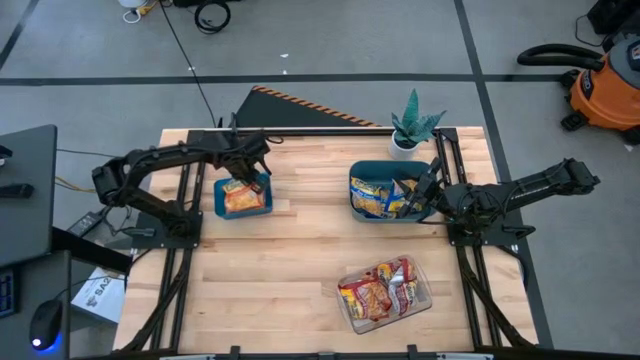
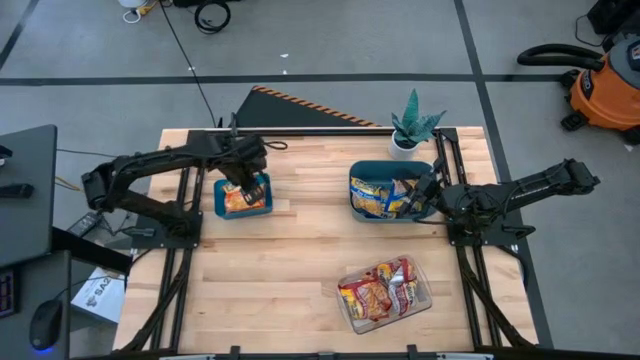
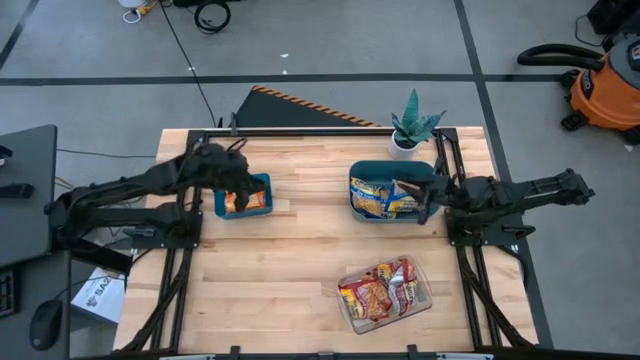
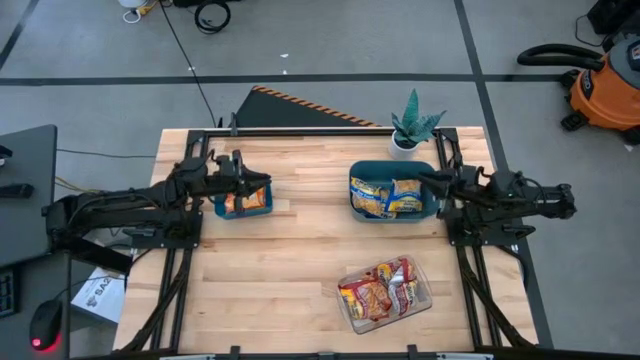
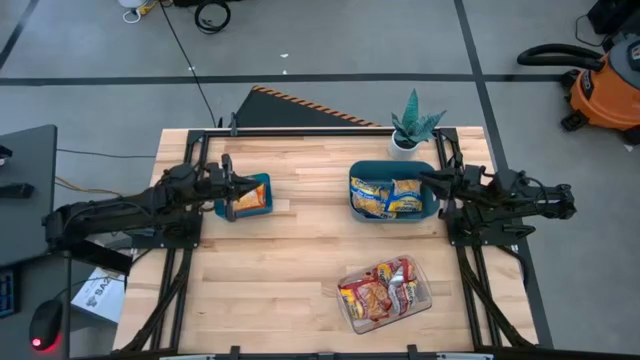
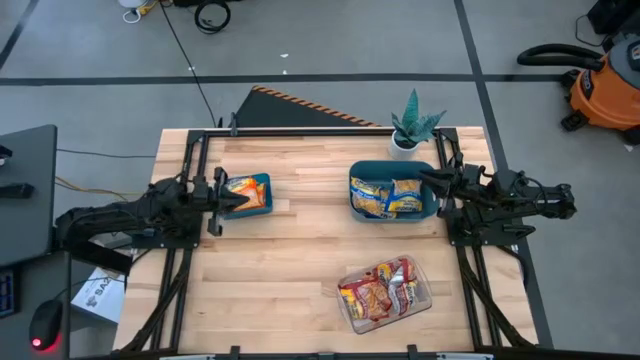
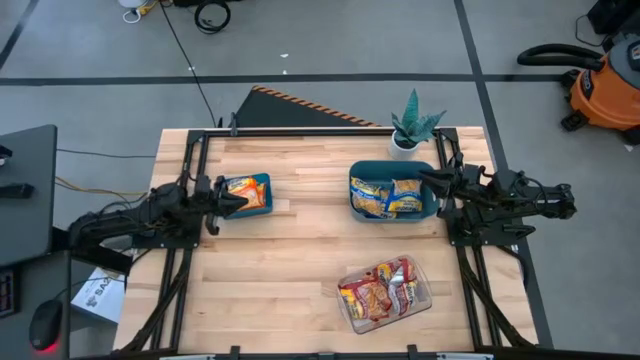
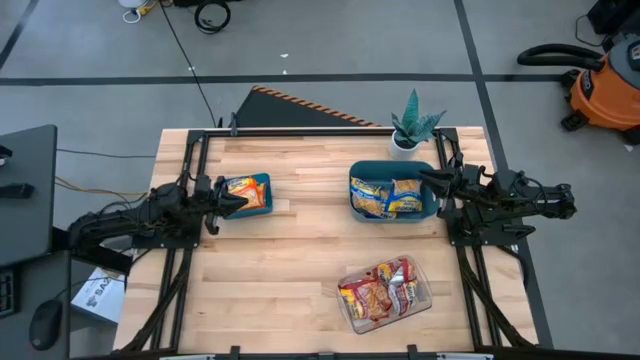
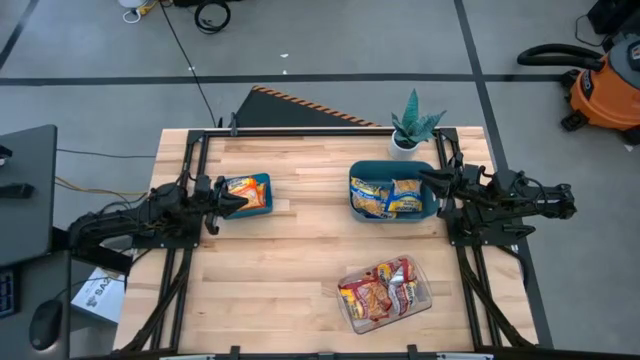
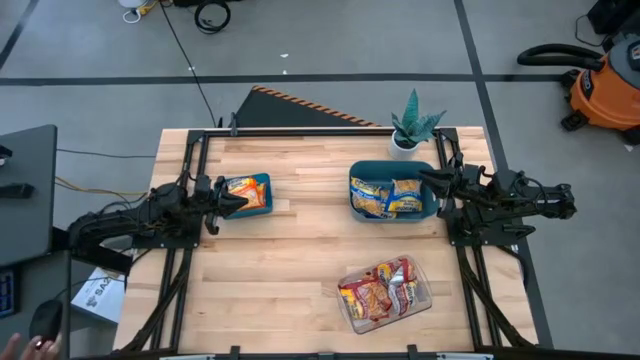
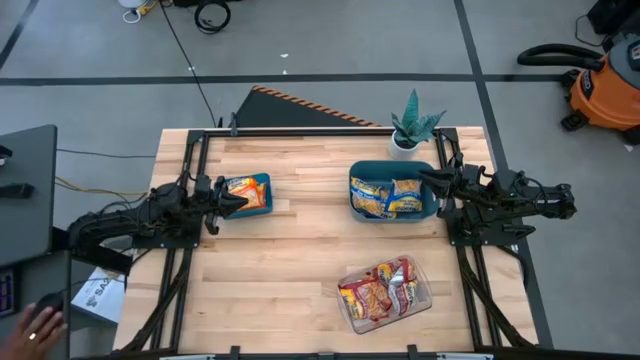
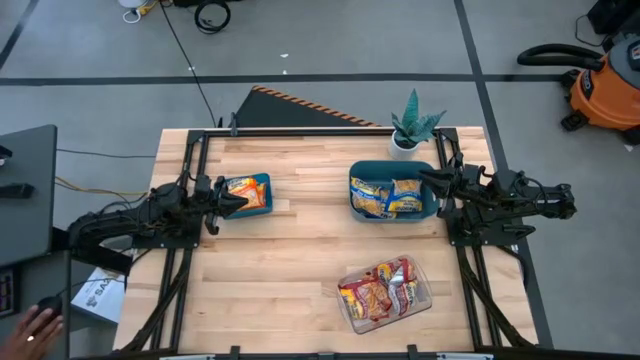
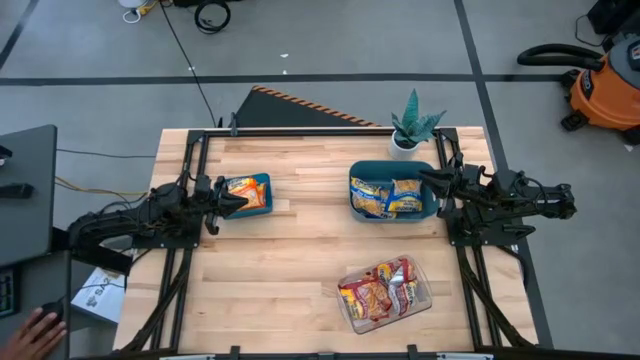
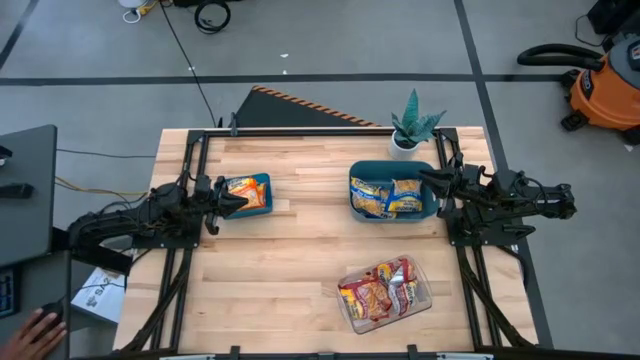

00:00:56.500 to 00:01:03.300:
Task: Sort Maruchan noodles
Return to Home Position

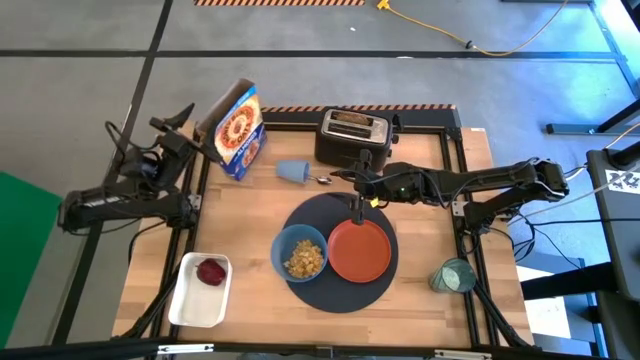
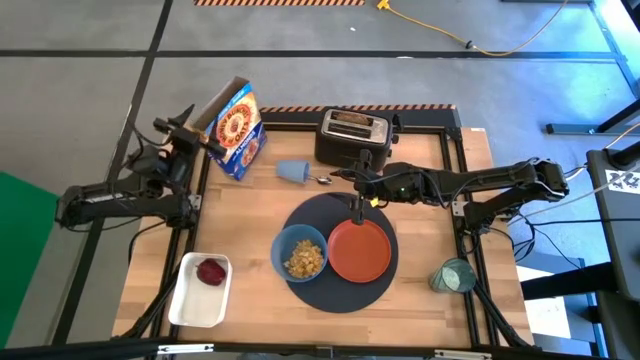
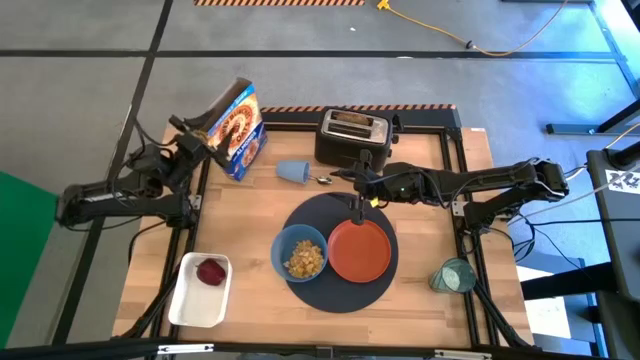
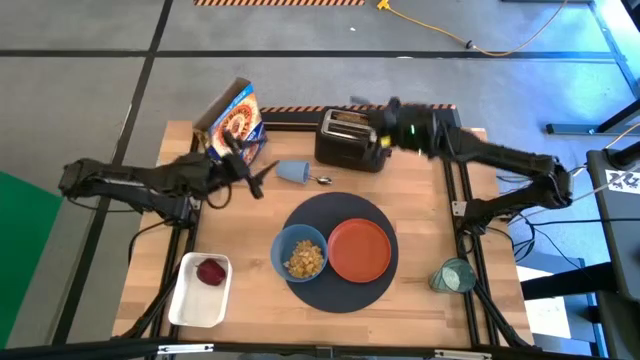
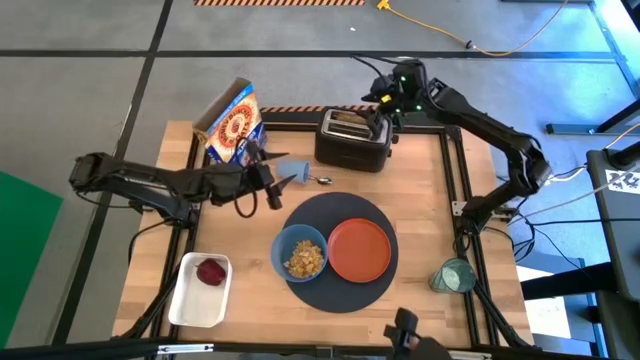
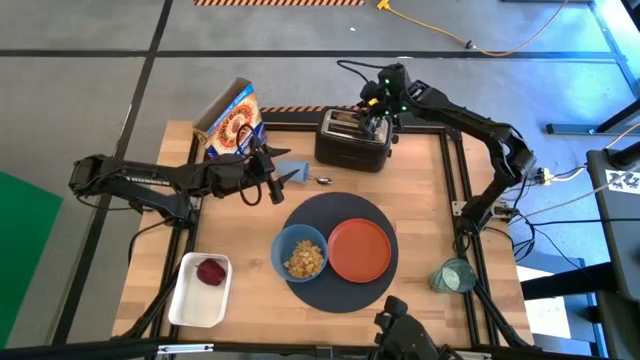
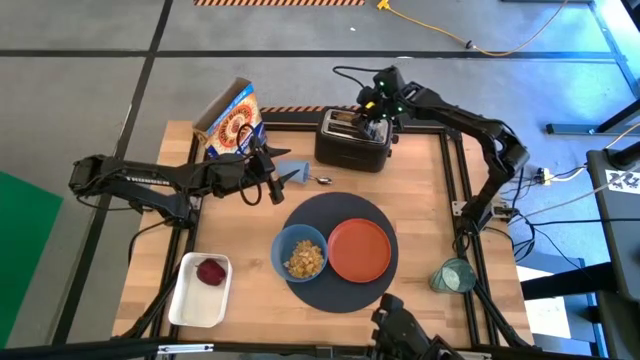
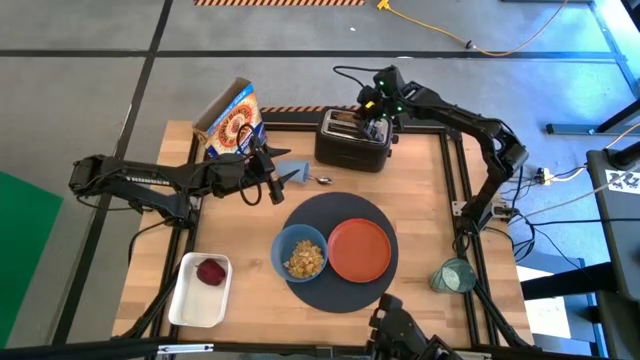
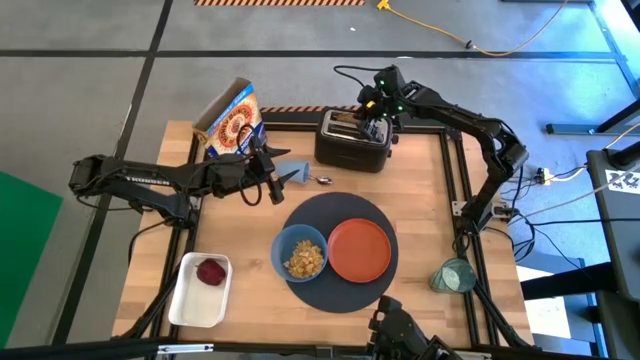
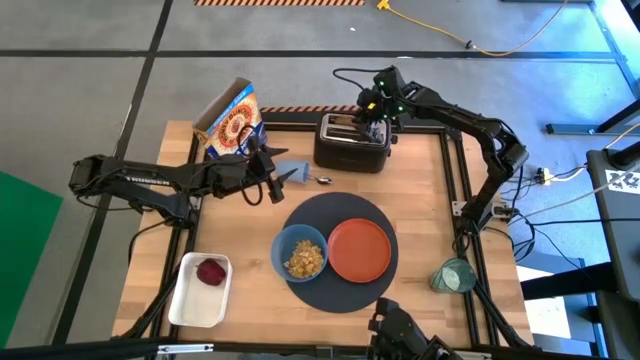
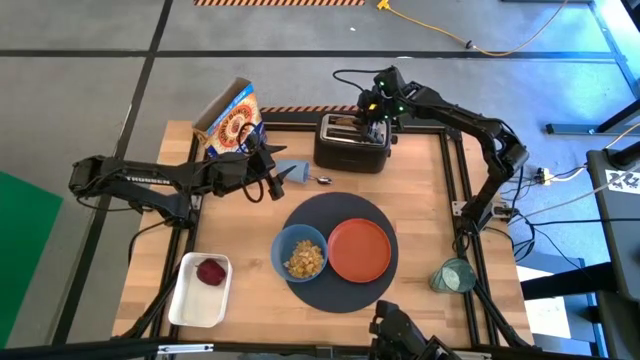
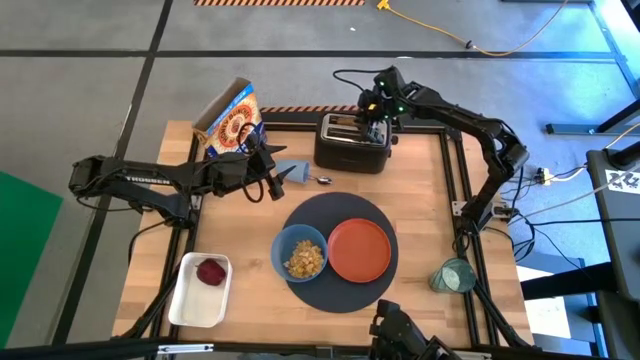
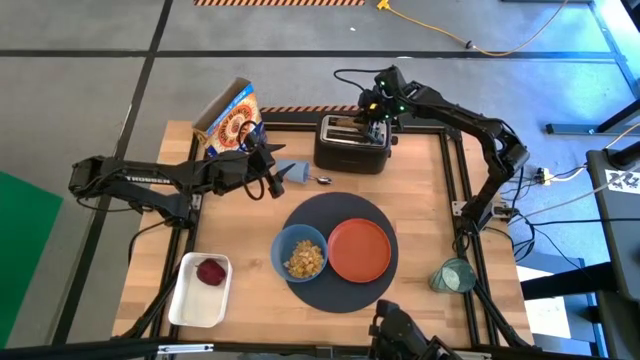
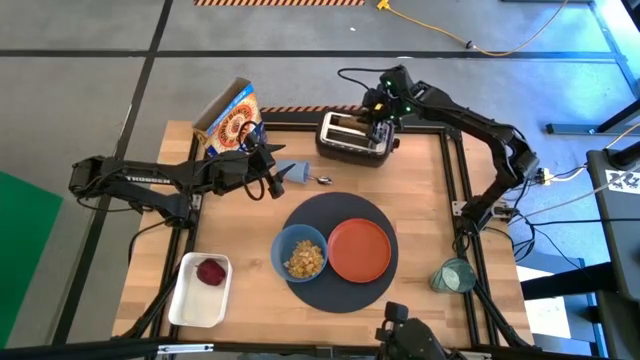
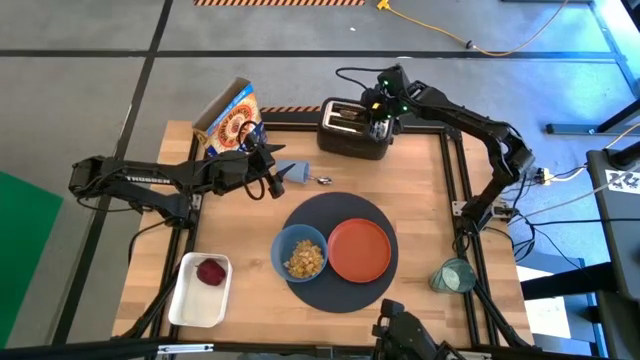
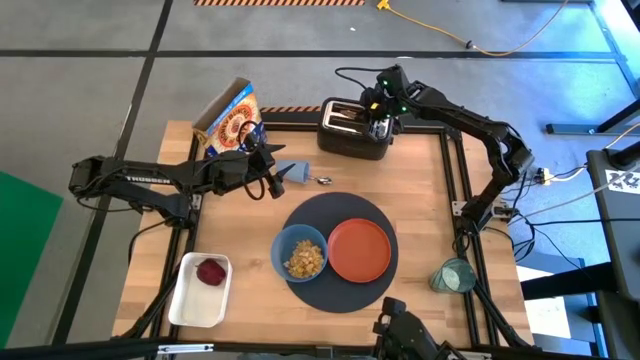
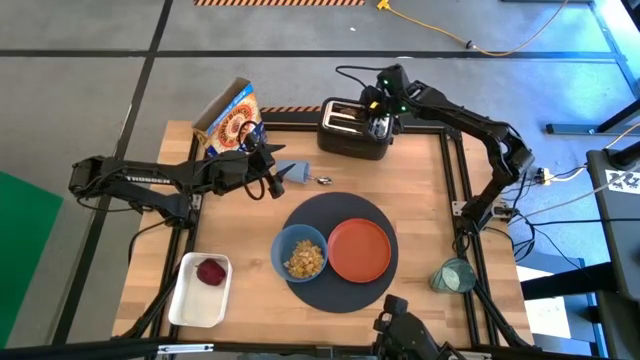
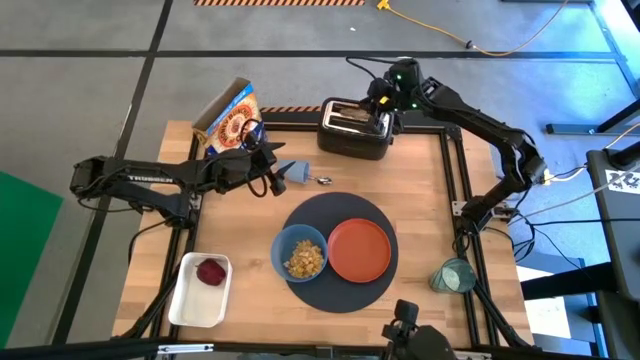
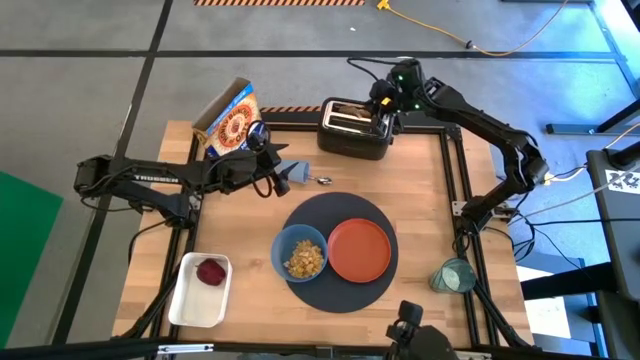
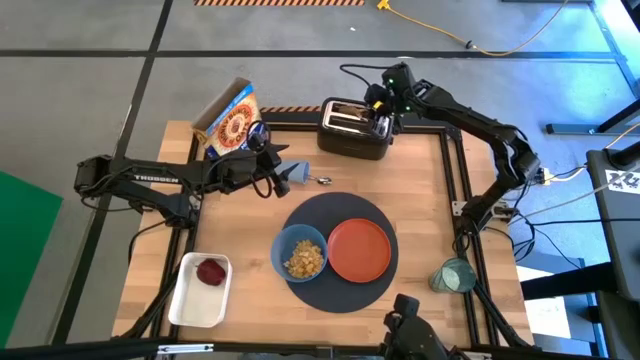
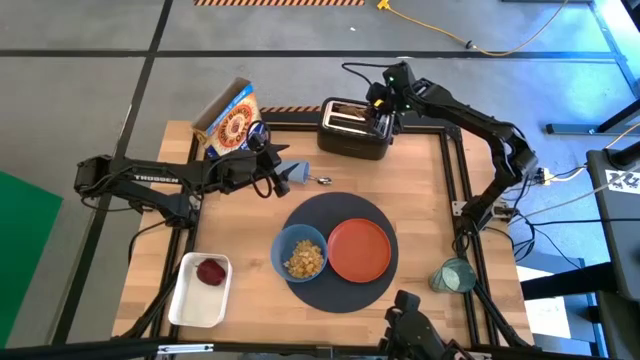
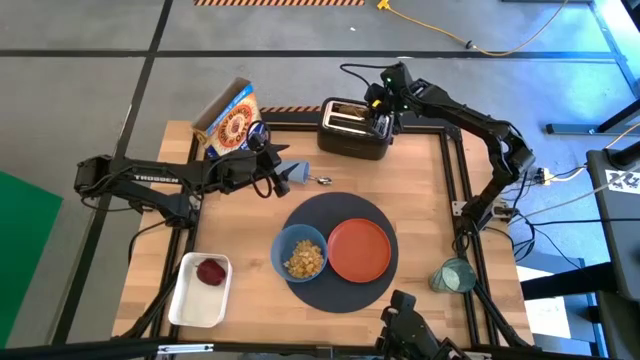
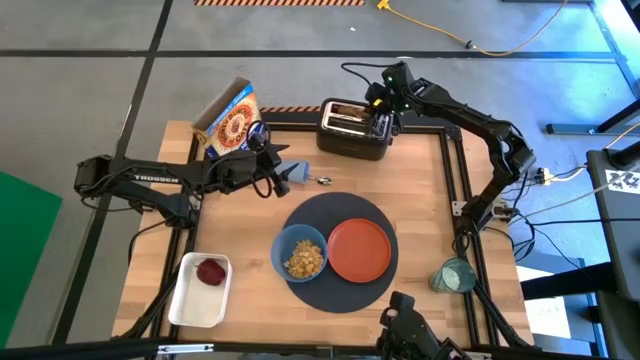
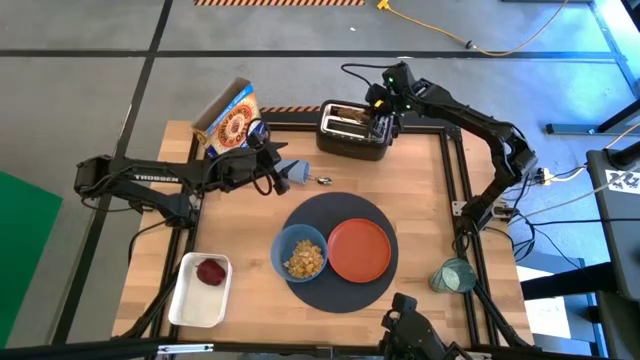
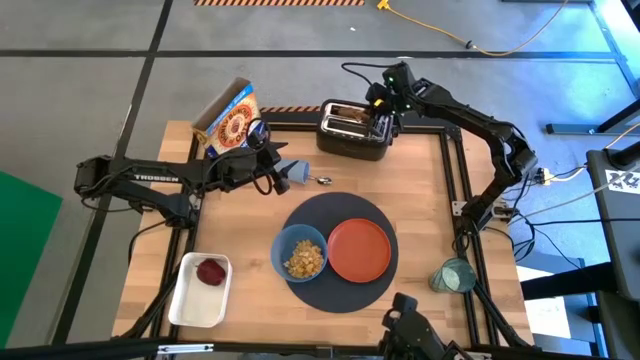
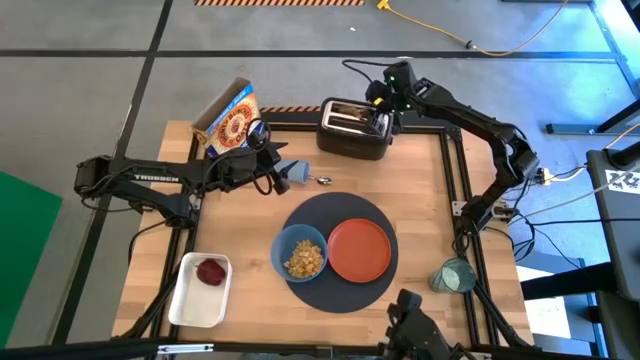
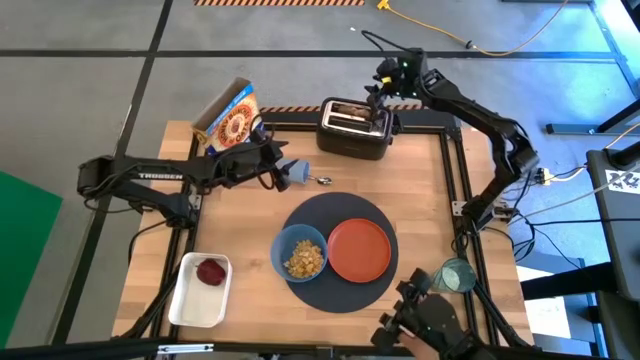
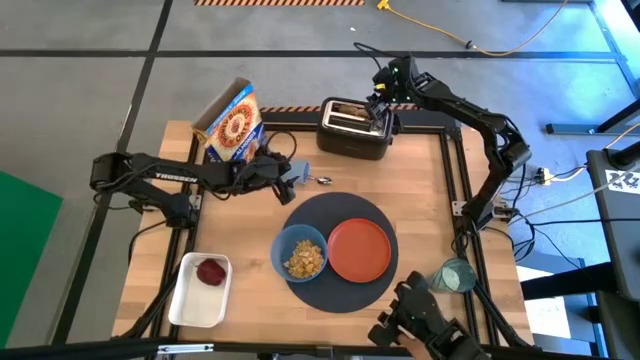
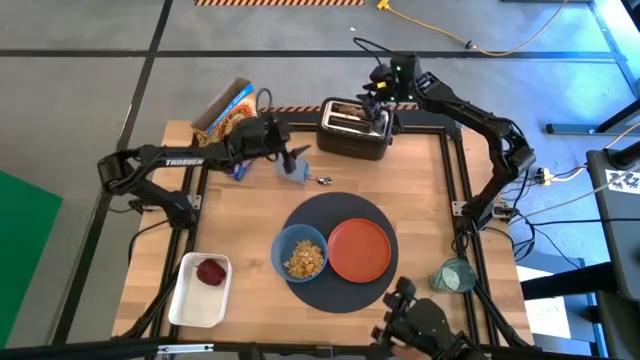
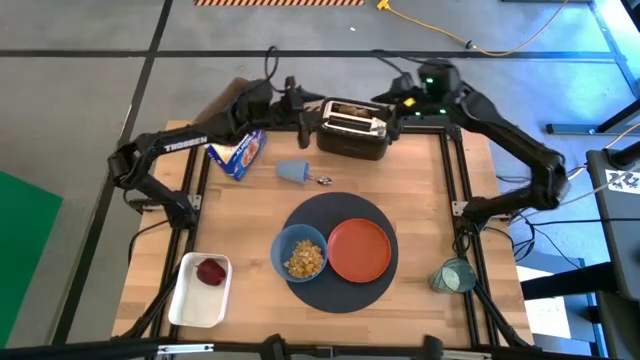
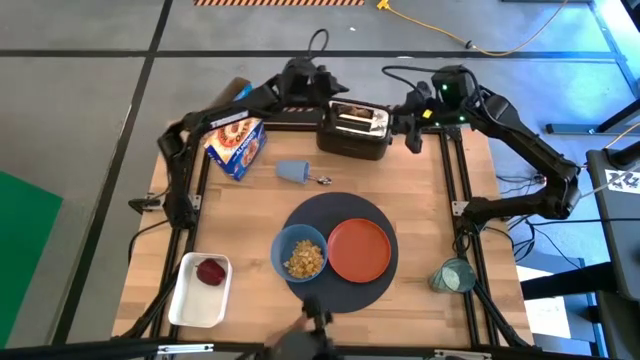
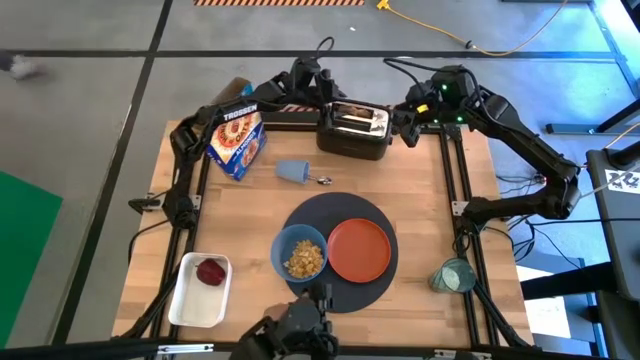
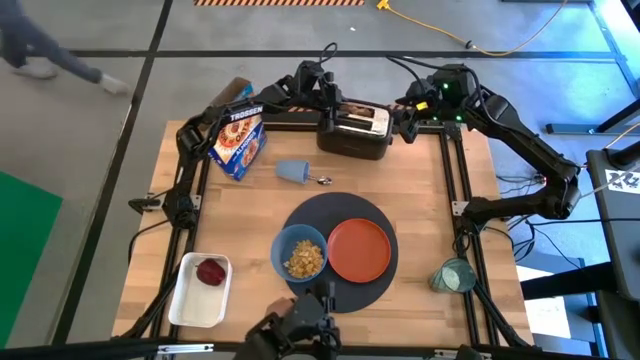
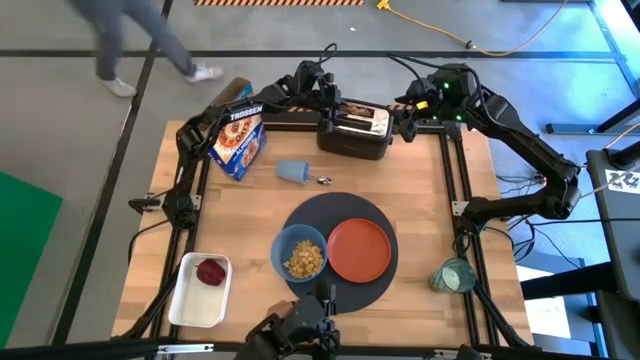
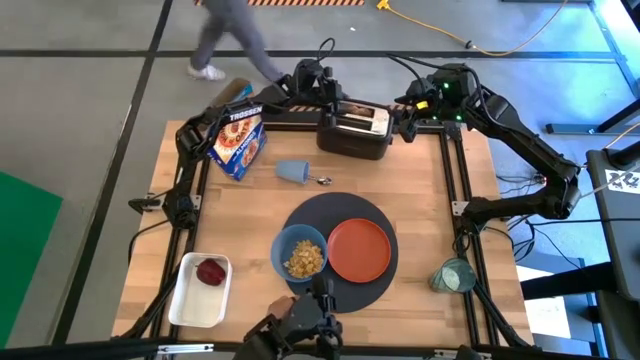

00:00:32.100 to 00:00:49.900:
Task: Arrange a breakfast setting
Put the toasted bread from the toaster onto the orange plate
